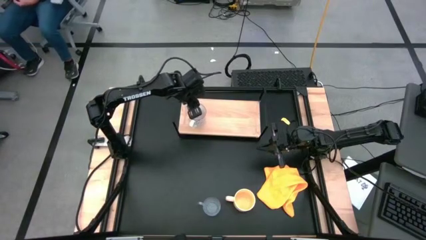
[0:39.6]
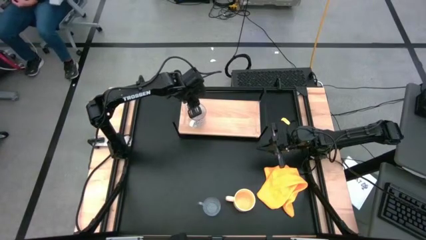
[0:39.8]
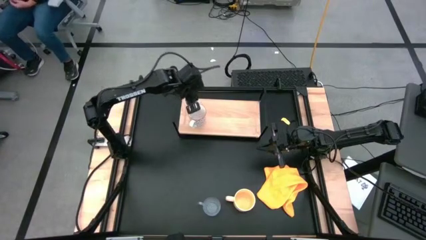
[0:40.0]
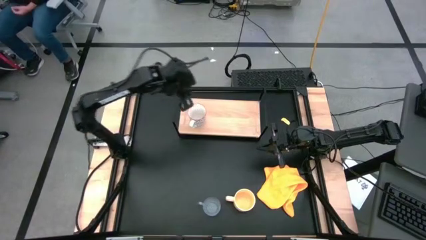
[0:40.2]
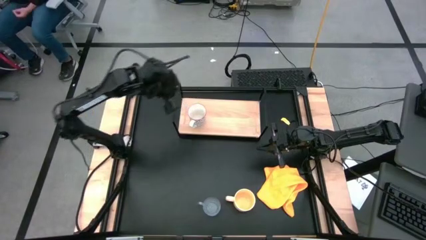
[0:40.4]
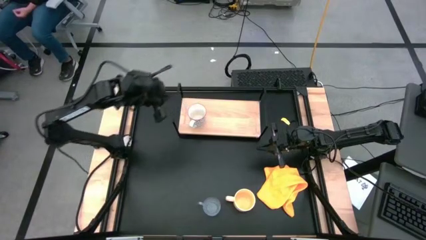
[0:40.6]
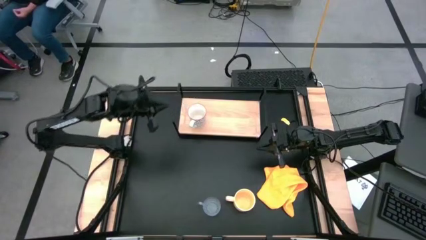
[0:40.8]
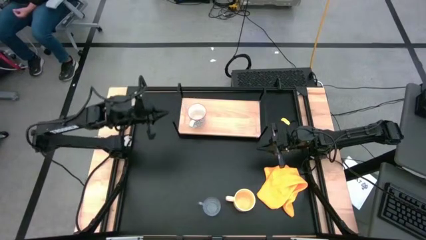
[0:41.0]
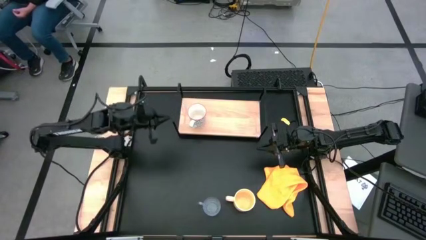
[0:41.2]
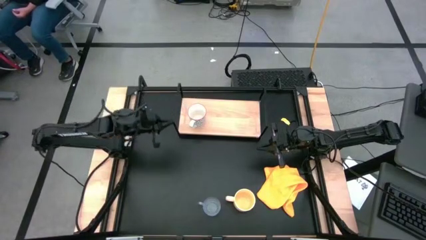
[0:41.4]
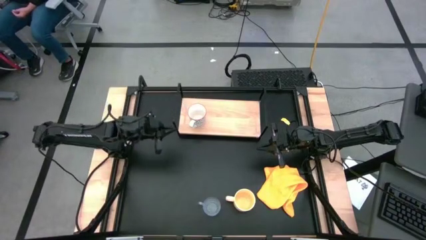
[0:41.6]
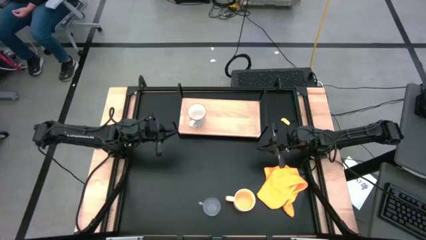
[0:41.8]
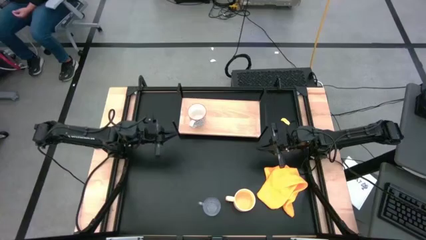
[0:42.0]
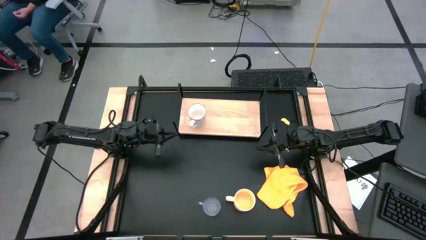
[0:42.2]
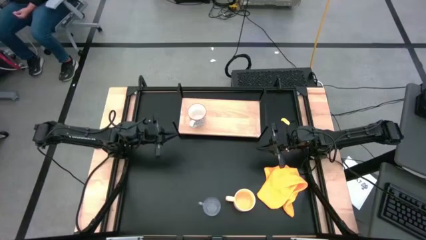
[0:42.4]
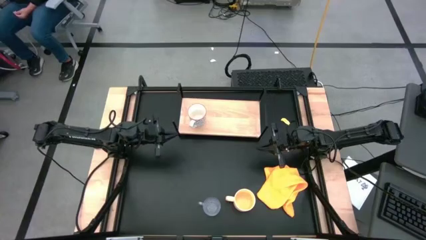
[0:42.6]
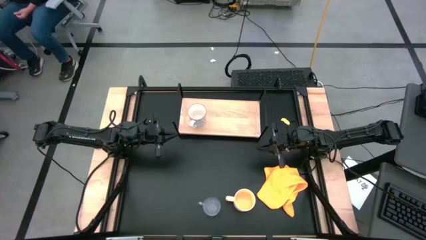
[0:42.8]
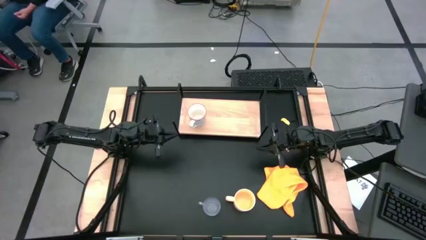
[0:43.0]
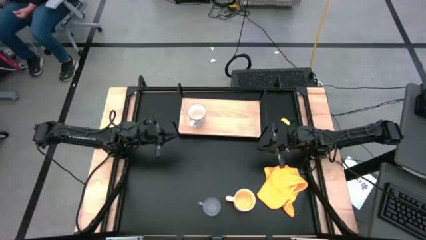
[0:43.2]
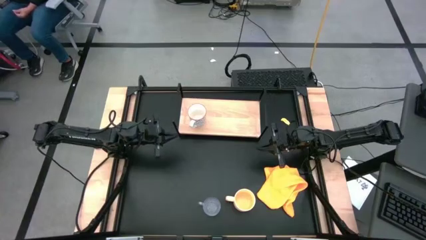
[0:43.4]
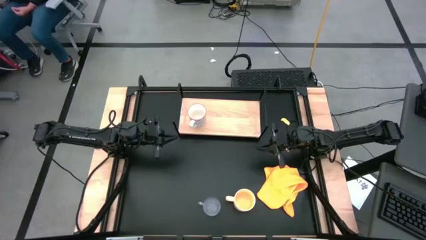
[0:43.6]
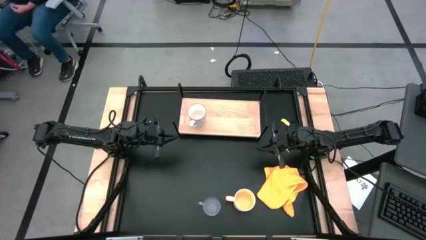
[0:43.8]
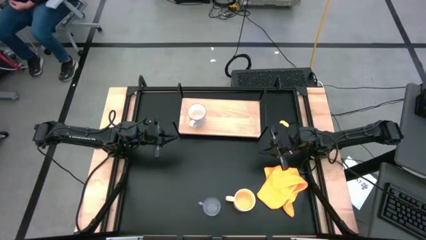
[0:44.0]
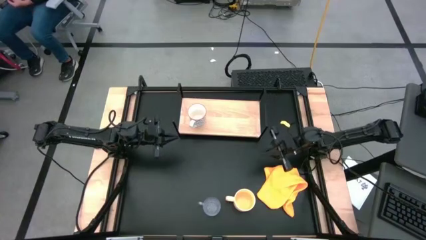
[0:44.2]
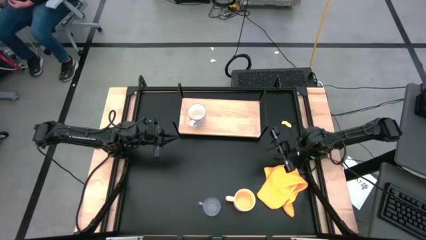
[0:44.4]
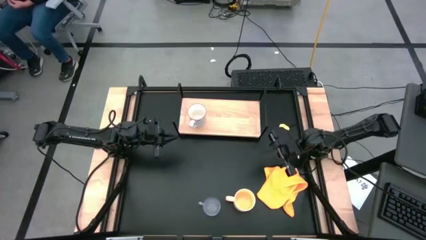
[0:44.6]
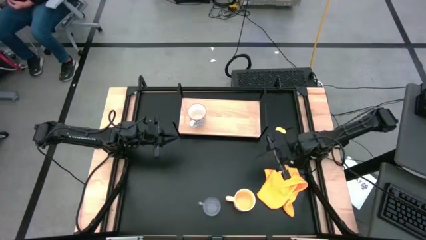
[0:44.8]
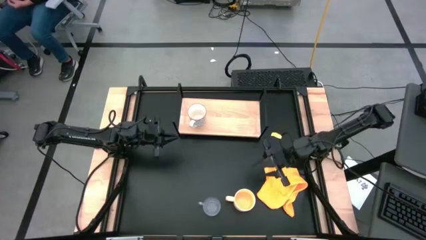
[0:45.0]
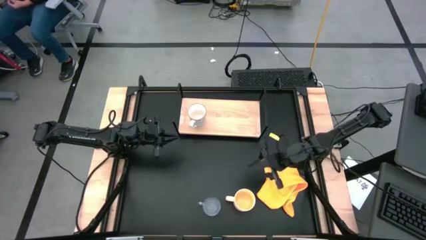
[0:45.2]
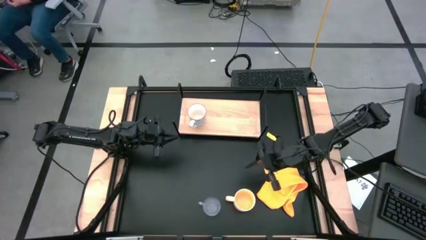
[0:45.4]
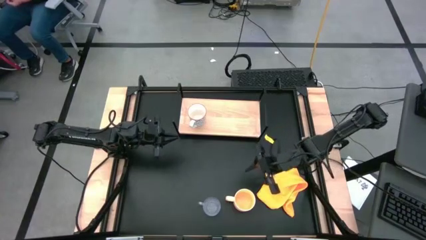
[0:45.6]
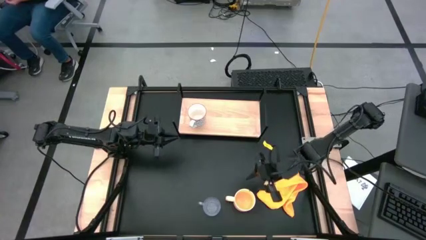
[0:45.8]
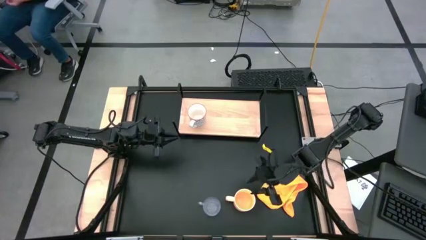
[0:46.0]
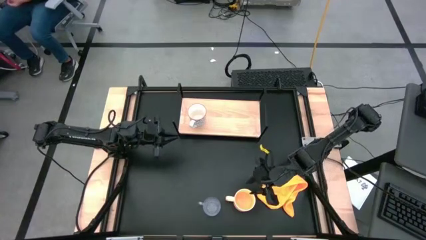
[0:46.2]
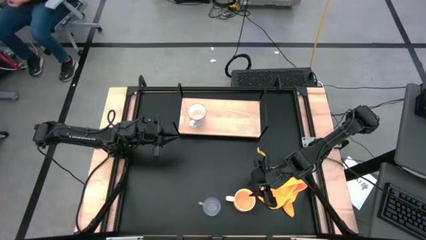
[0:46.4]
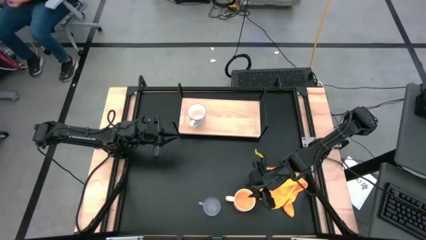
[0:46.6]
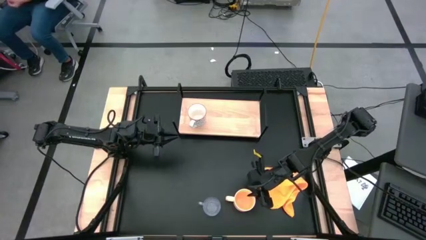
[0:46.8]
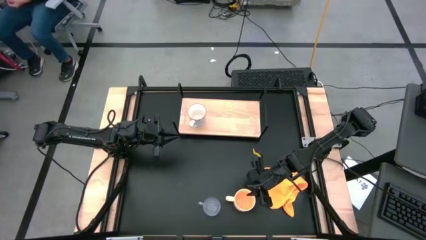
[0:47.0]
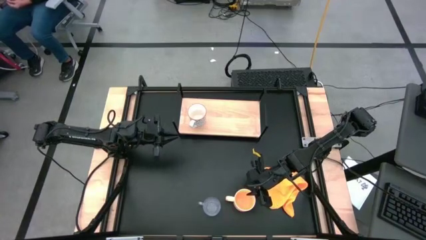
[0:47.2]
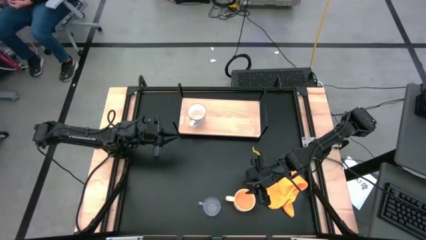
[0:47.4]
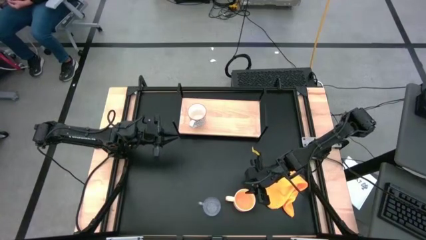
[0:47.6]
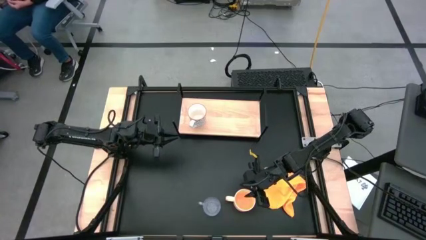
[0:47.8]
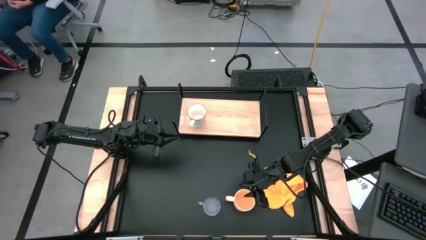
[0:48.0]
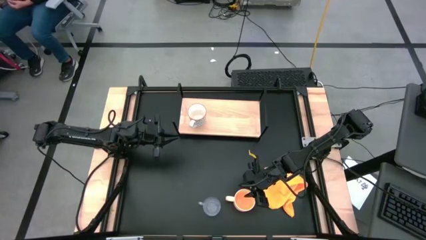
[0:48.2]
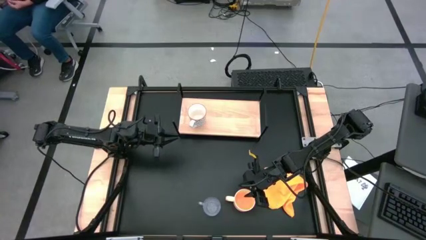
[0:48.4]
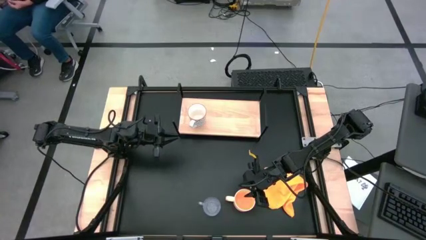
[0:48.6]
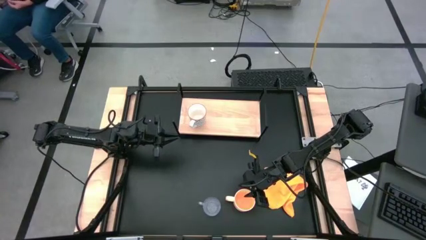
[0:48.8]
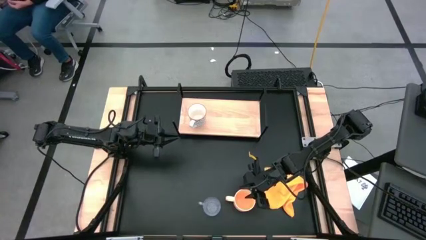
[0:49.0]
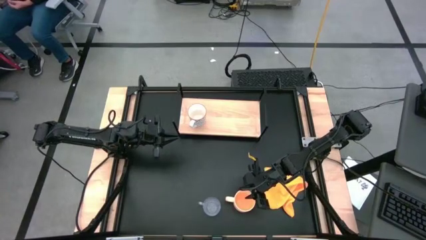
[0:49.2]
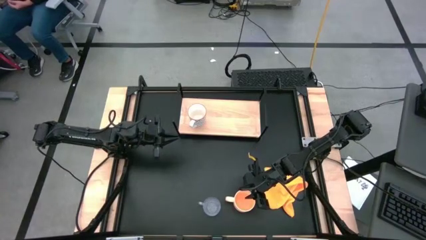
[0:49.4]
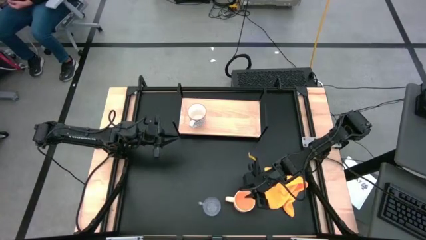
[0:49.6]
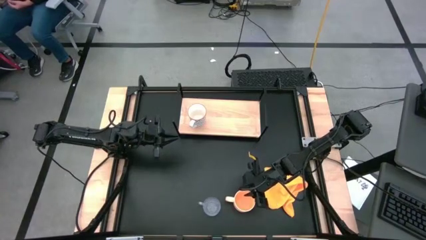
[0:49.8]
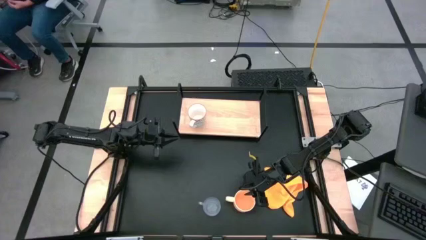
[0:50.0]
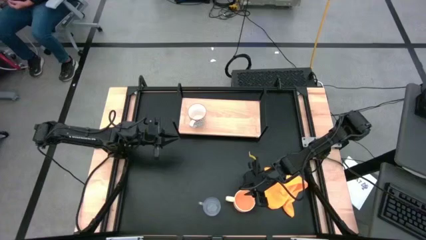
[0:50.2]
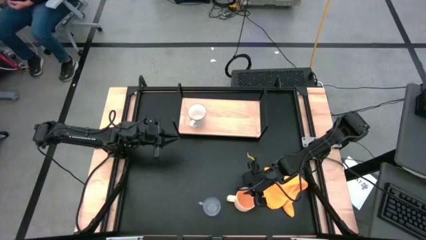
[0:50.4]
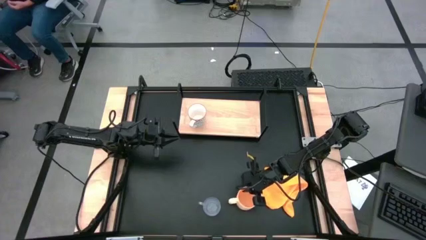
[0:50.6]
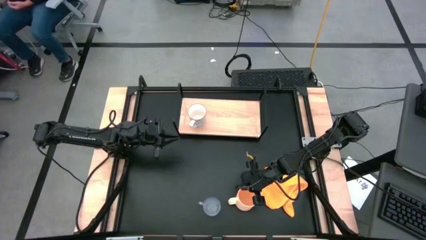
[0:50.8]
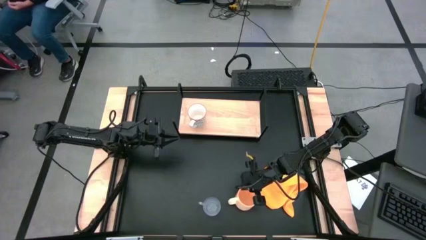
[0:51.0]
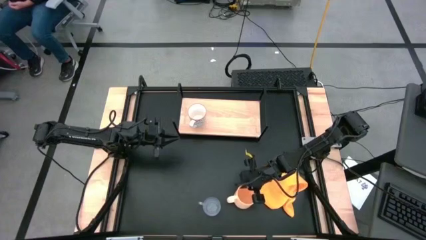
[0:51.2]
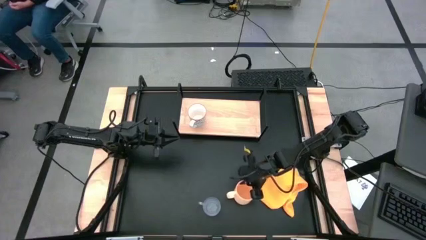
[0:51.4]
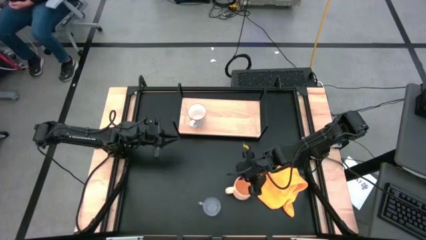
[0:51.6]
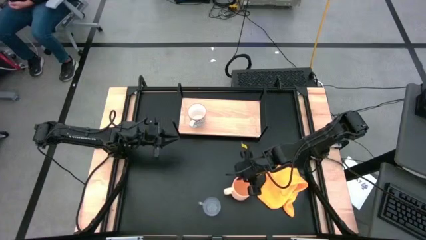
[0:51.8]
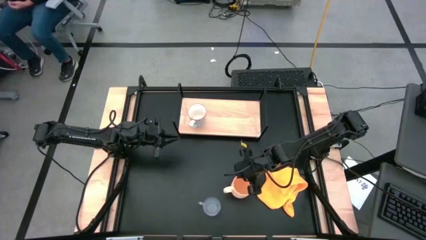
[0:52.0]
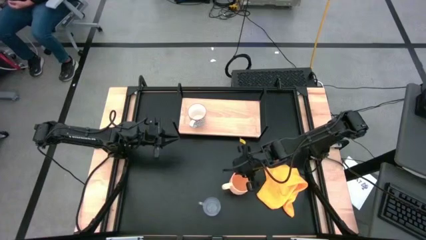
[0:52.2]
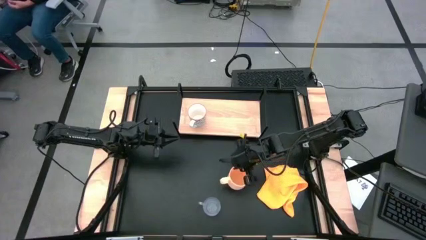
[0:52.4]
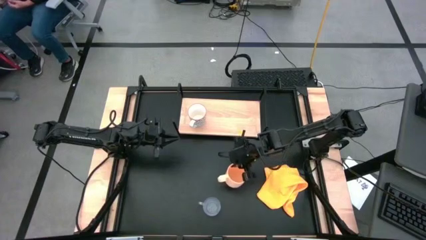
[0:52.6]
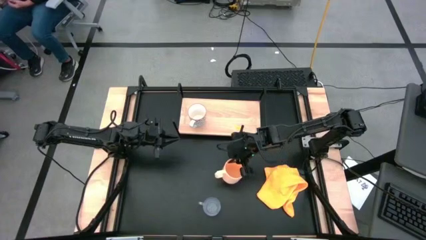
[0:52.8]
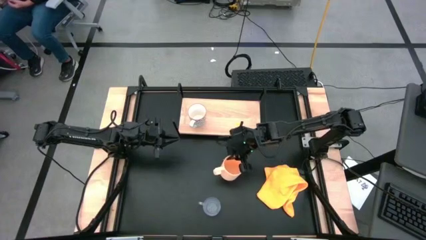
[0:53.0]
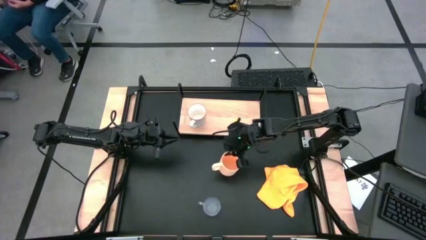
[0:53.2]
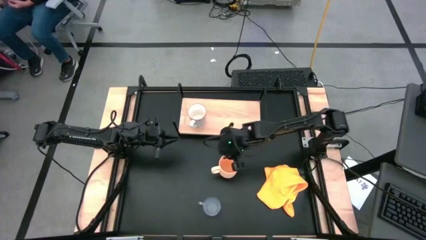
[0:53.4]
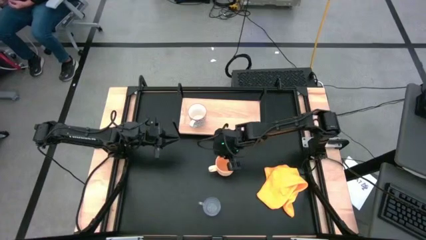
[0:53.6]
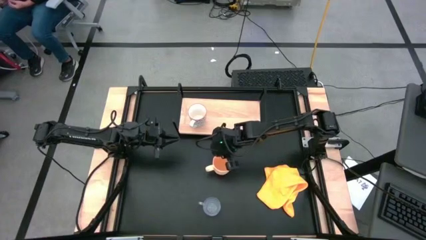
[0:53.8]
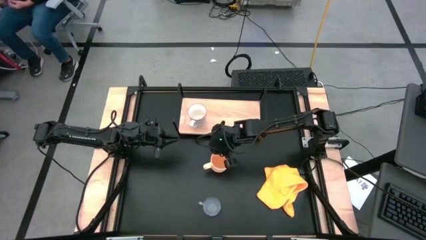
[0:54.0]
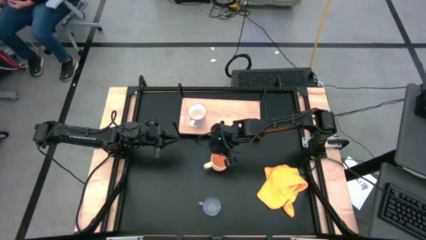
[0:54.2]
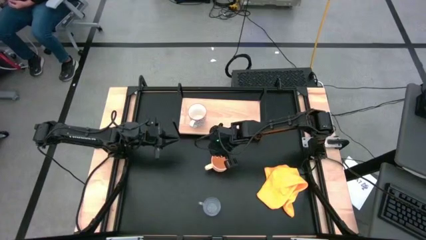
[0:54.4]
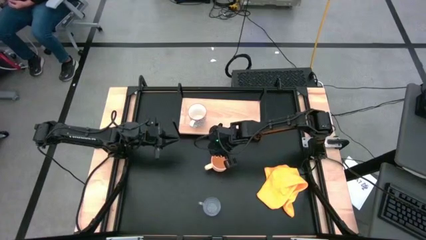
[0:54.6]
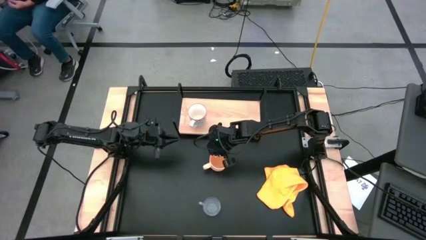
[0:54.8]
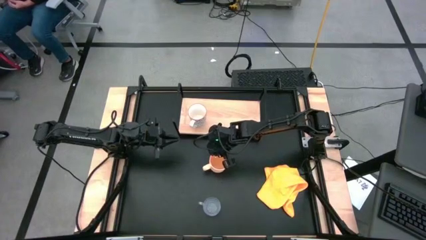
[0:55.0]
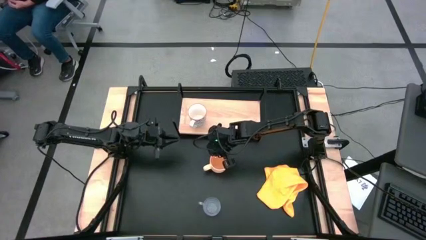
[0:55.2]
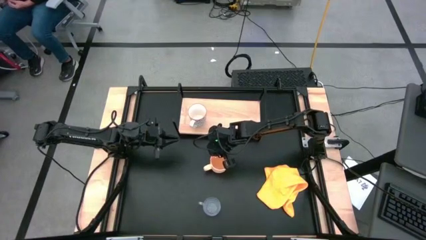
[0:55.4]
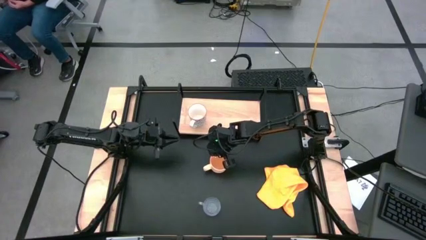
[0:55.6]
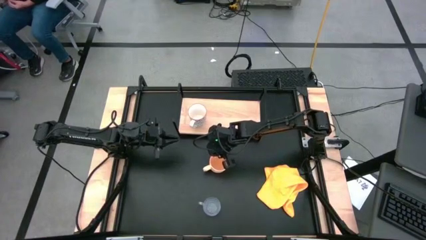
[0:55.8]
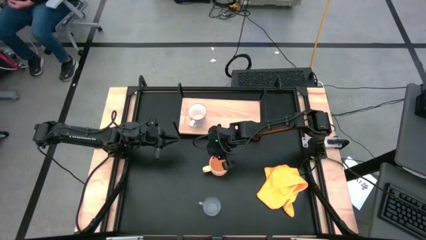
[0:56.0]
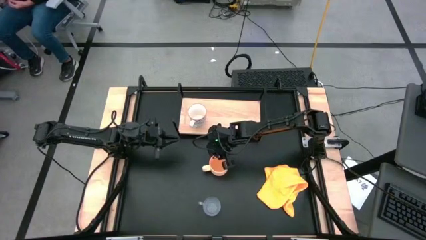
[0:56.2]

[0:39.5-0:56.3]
Task: Stack small to large cups/mugs on shelf
Put the orange mug on the shelf
